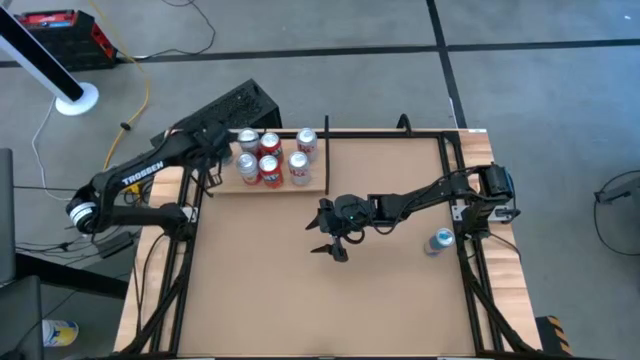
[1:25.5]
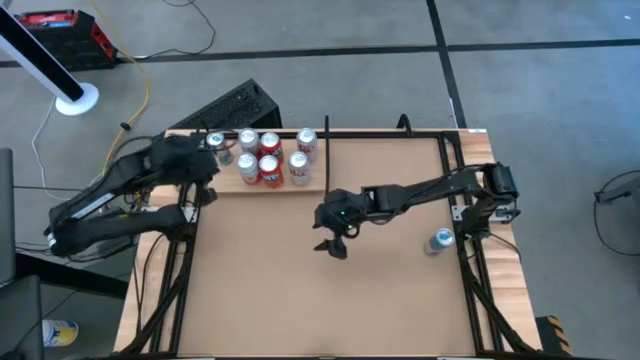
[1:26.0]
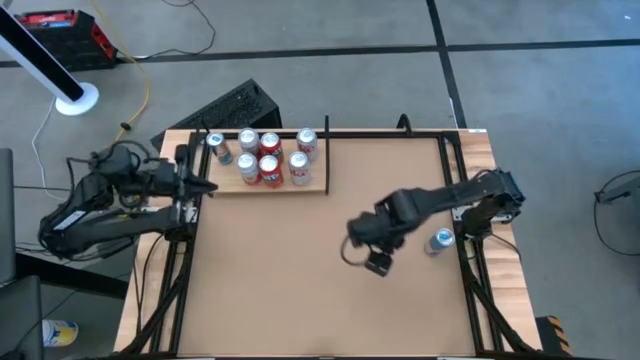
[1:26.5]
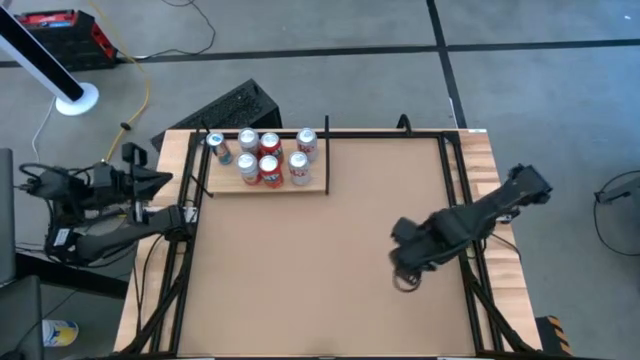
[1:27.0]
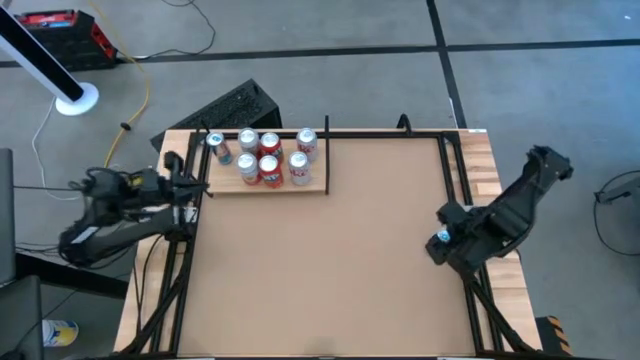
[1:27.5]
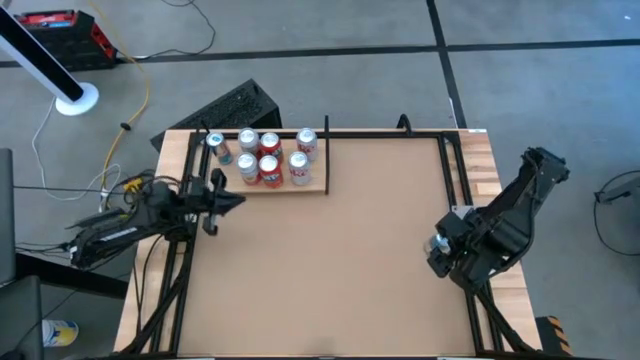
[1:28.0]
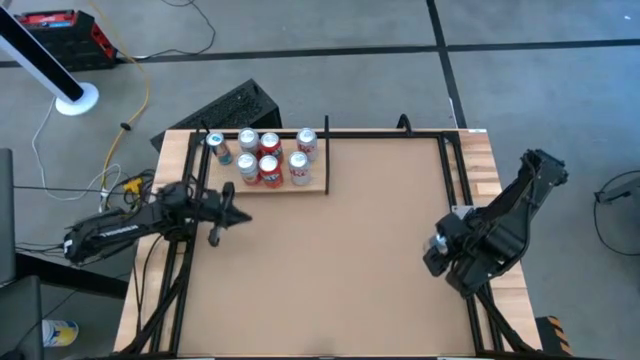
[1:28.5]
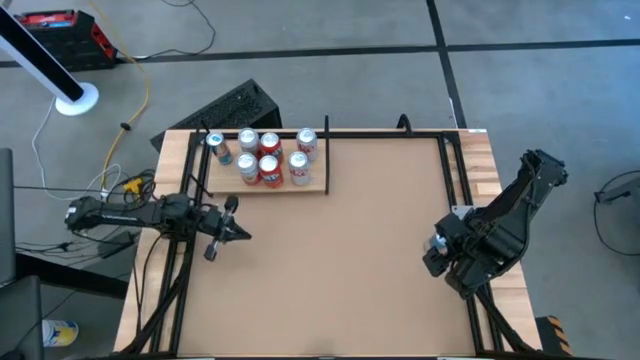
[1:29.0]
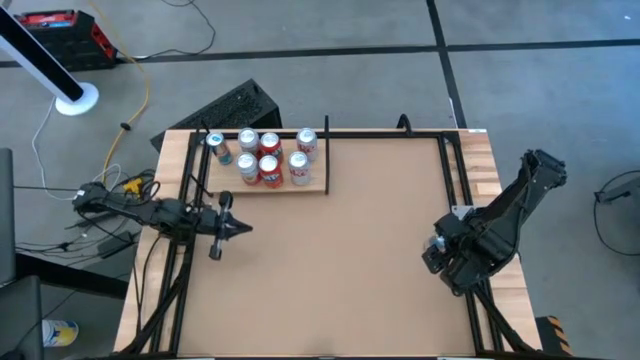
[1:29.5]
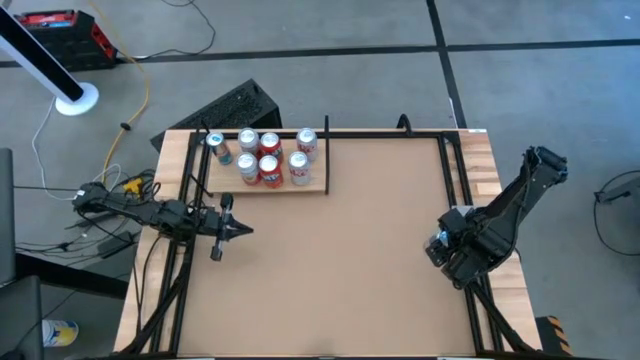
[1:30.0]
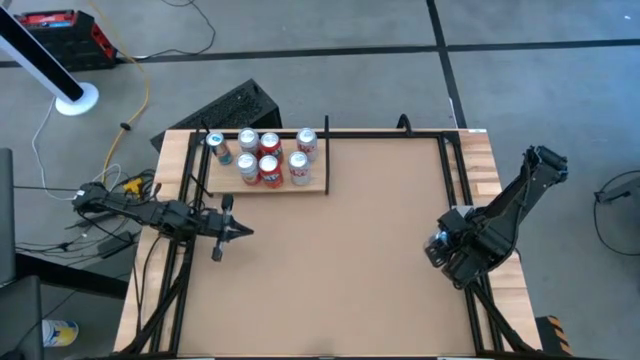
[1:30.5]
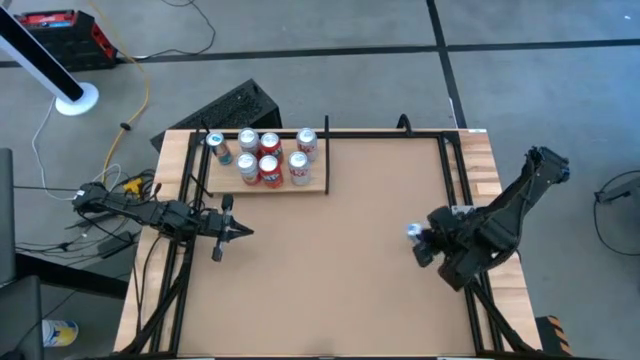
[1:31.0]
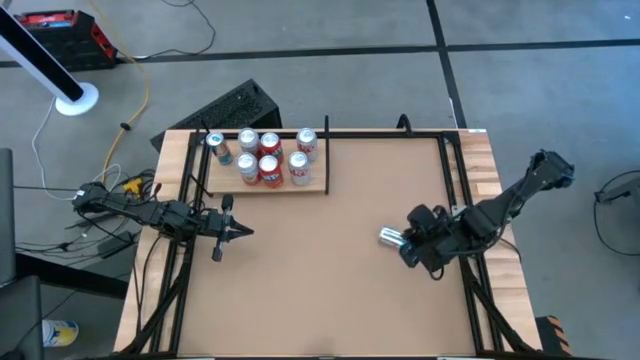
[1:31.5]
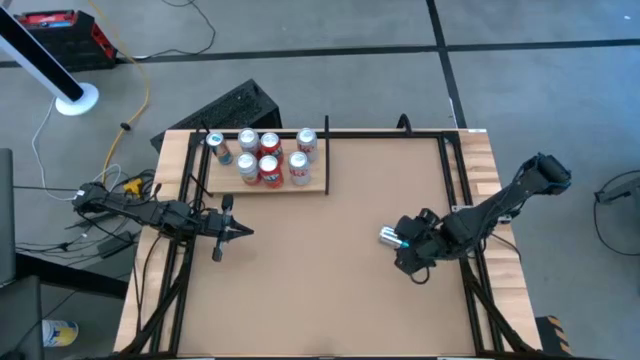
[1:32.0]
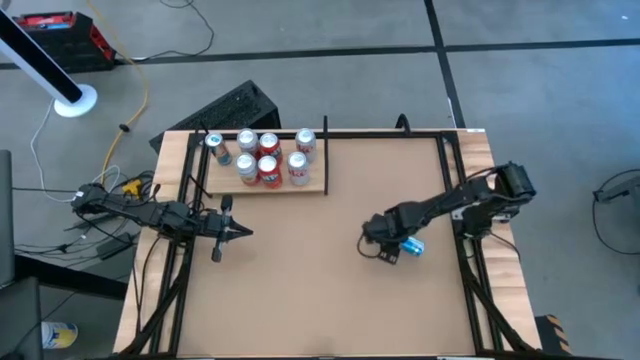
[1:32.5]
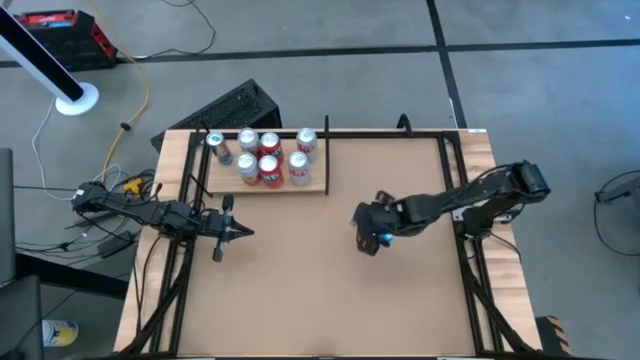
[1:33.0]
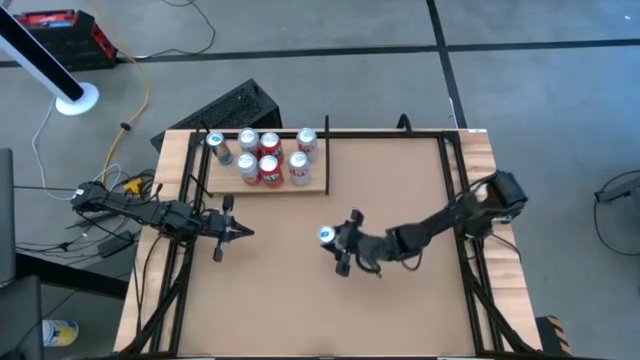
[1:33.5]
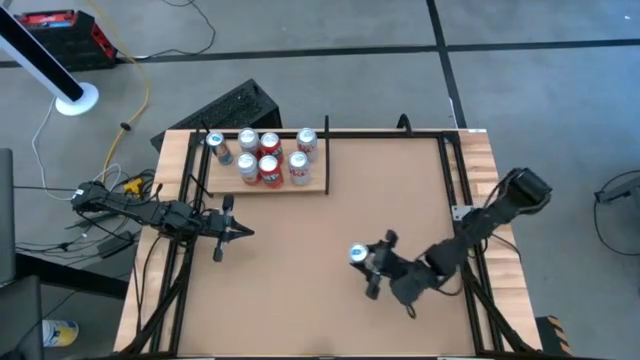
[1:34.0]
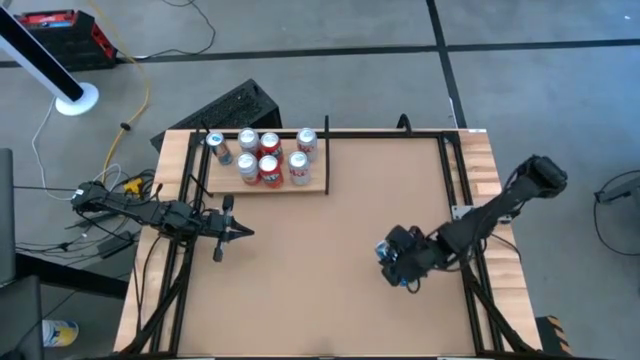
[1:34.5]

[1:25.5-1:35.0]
Task: Place canned beverage on shelf
Put the blue soda can on the shelf aligned with the other blue soda can

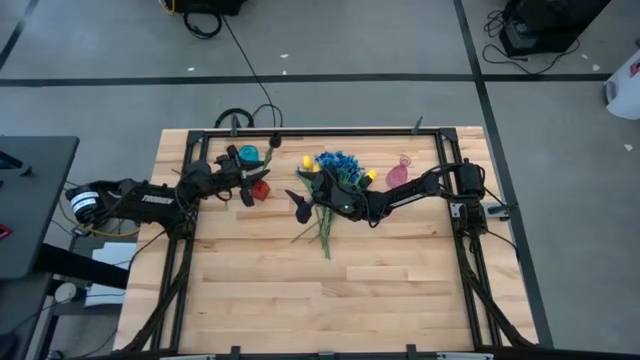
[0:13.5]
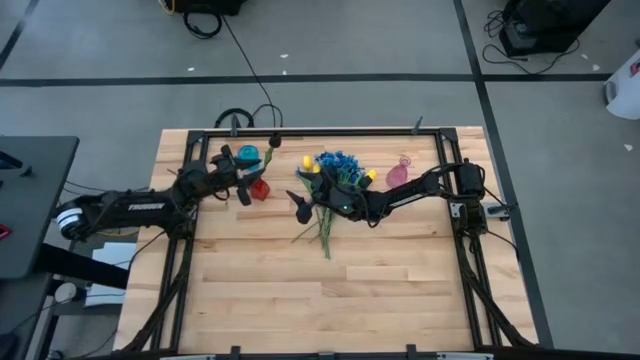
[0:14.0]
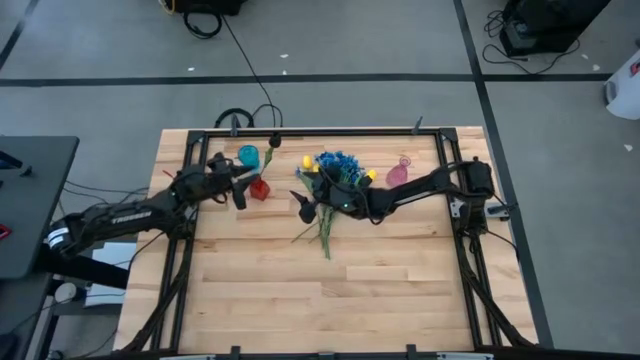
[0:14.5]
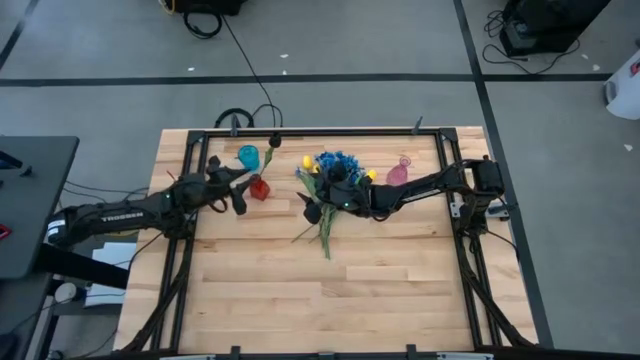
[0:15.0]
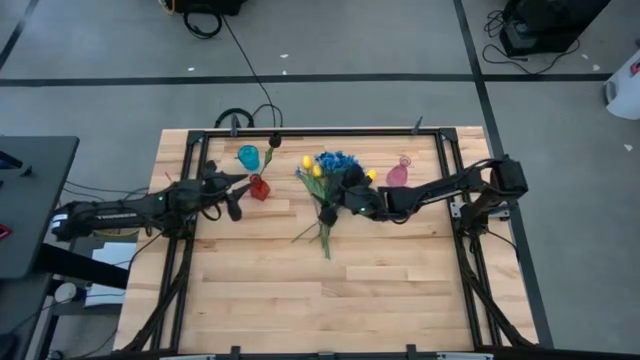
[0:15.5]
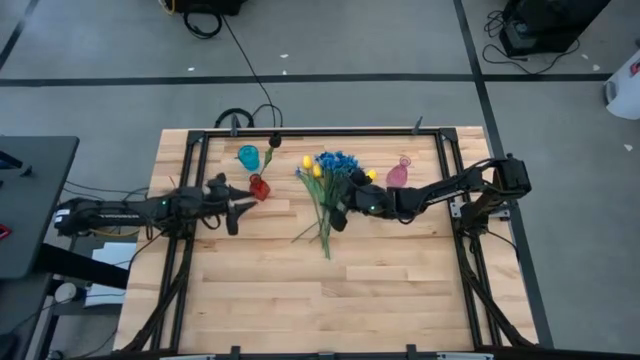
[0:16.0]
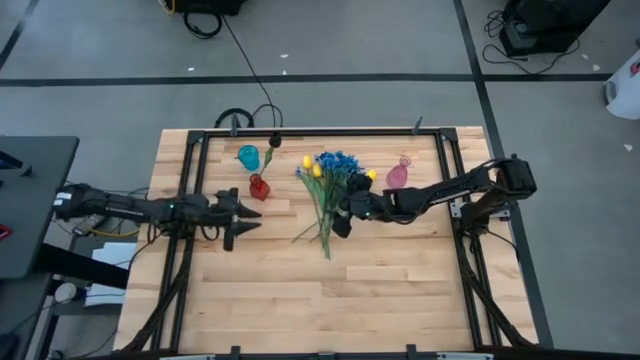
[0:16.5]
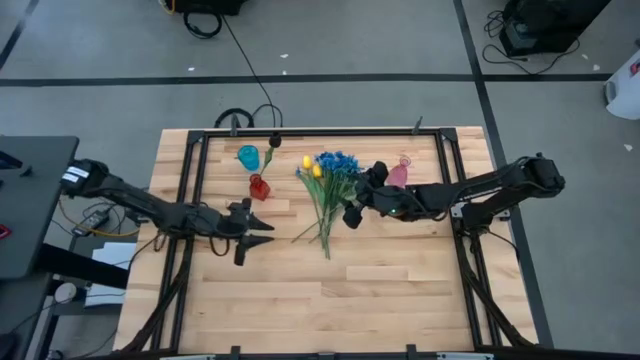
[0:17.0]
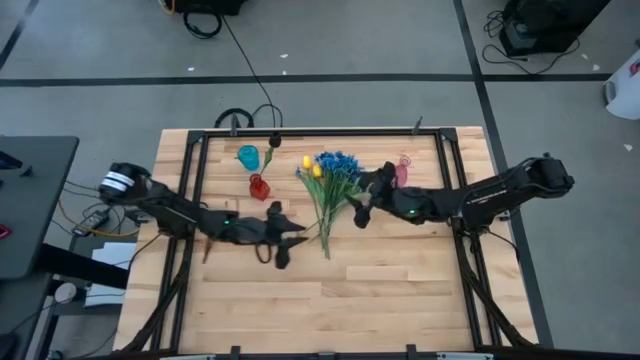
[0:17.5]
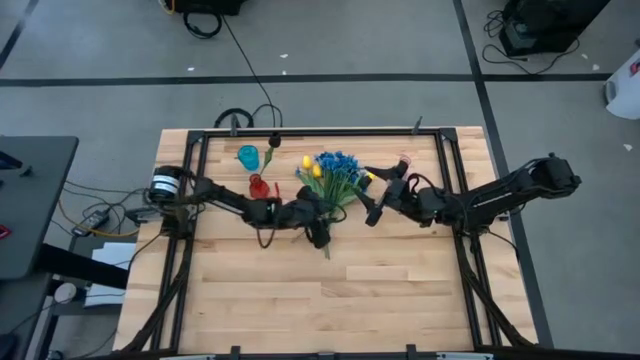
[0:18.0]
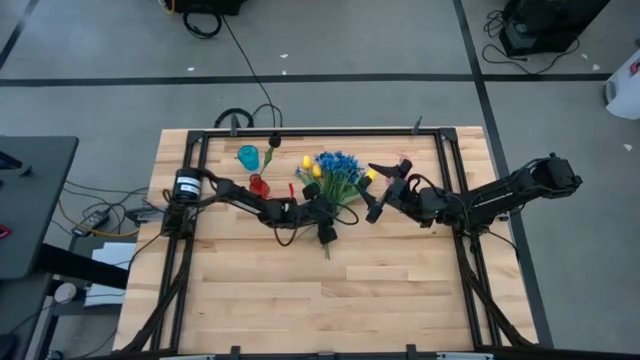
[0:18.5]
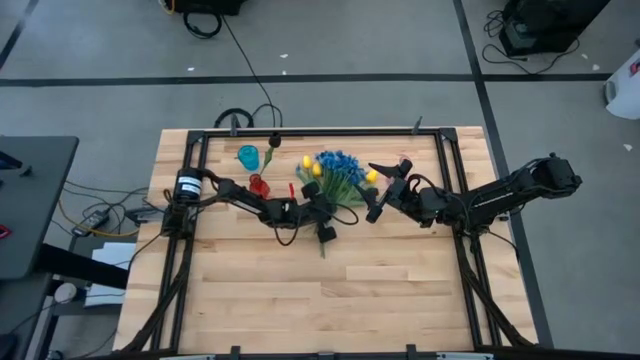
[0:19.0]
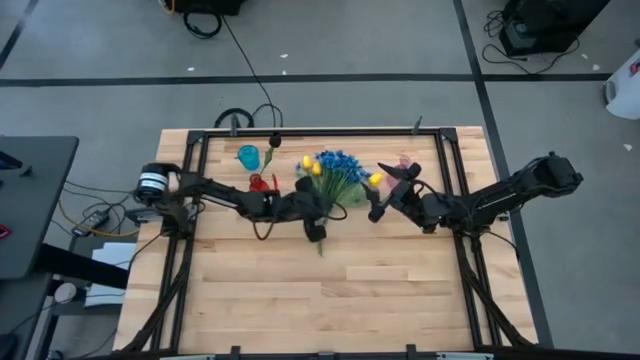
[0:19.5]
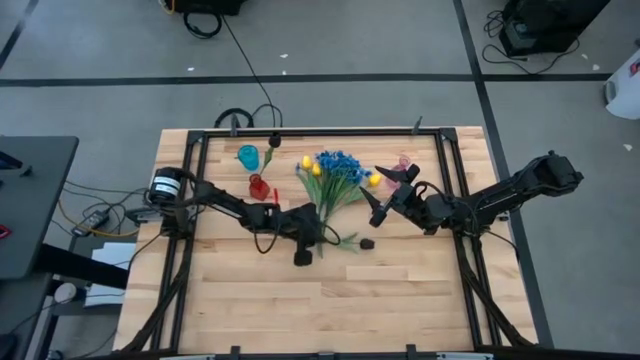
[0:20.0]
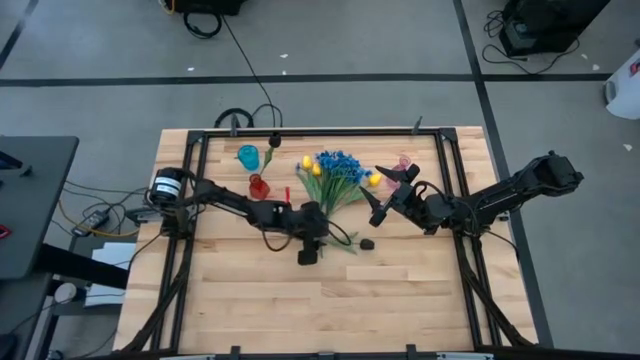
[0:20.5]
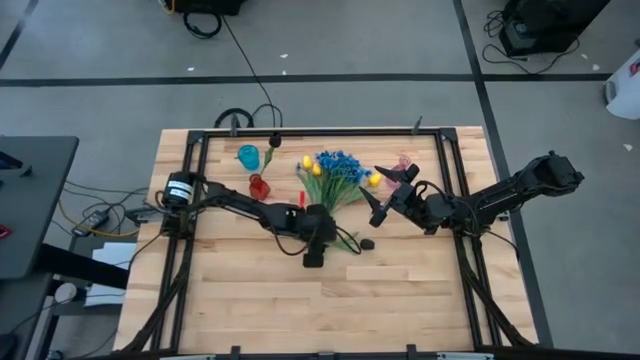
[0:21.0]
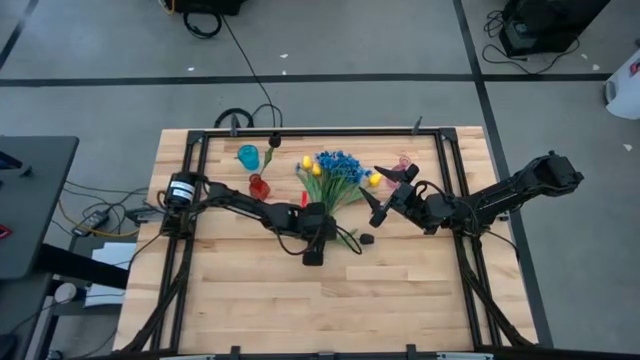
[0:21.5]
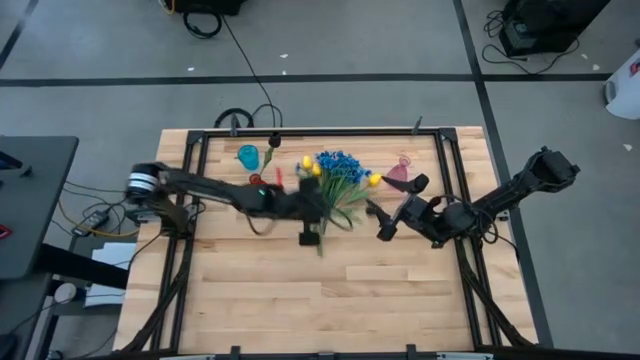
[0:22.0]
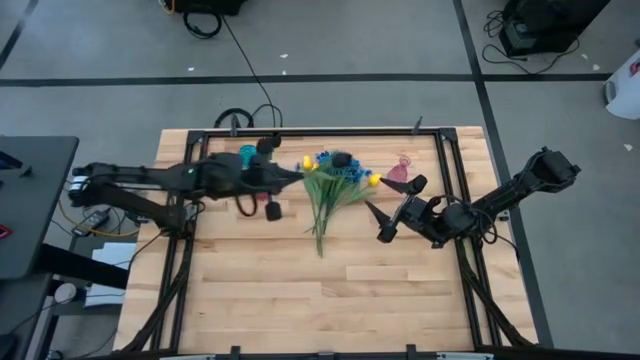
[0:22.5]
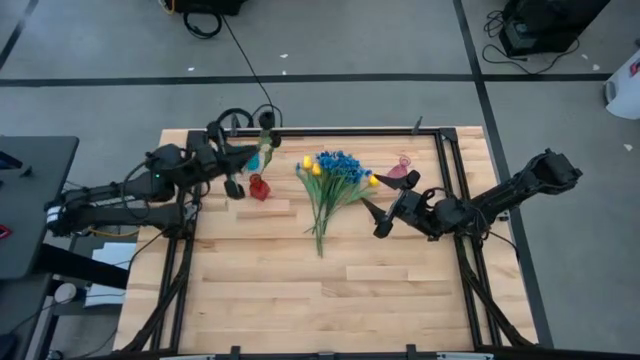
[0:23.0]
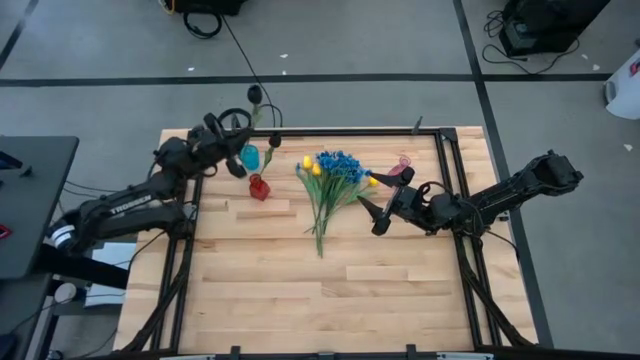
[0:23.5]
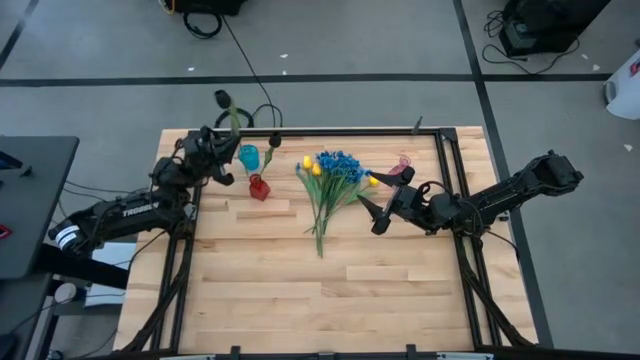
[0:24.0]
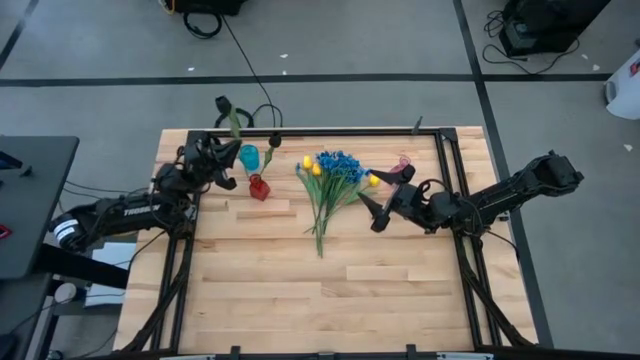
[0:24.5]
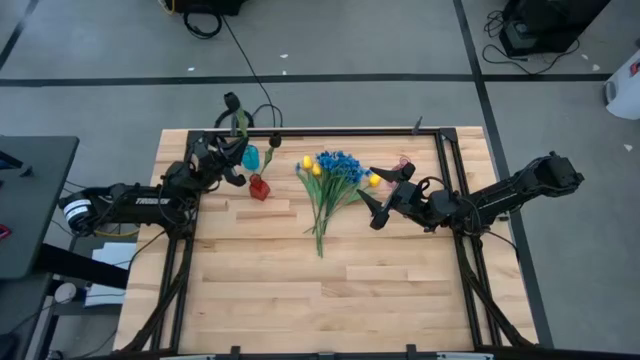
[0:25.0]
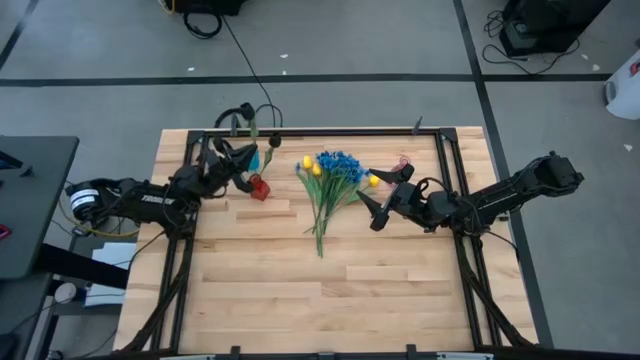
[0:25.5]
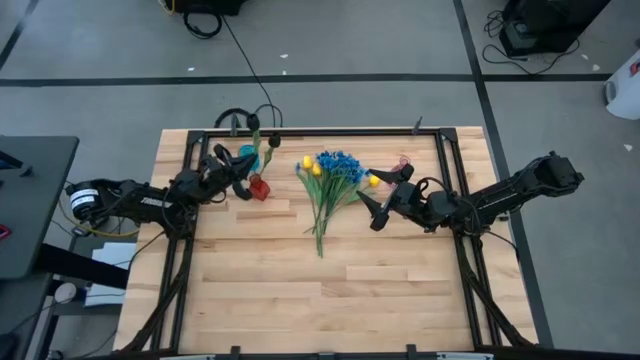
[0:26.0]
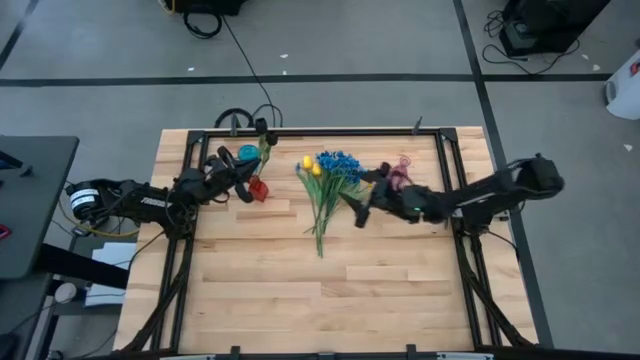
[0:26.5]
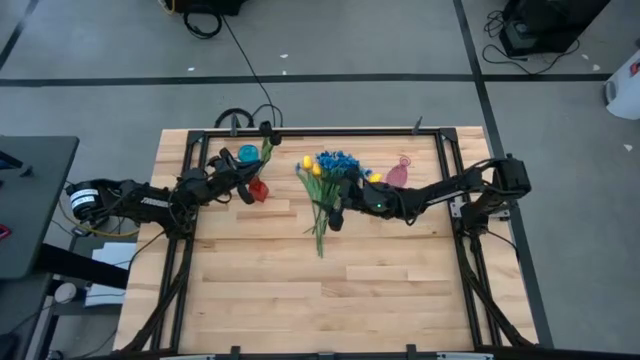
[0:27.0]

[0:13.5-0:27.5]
Task: Sort flowers into vase by color
Put the black flower into the red vase
